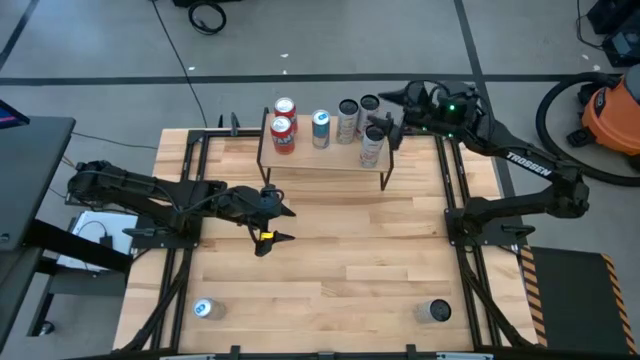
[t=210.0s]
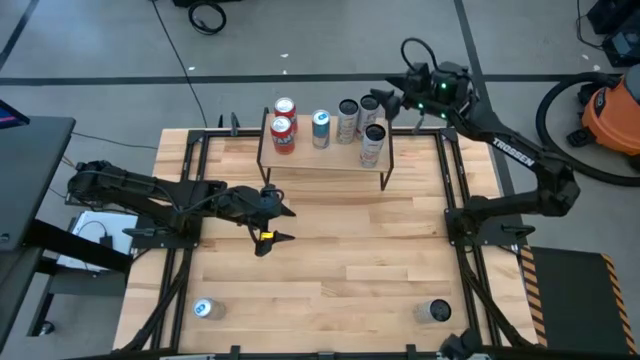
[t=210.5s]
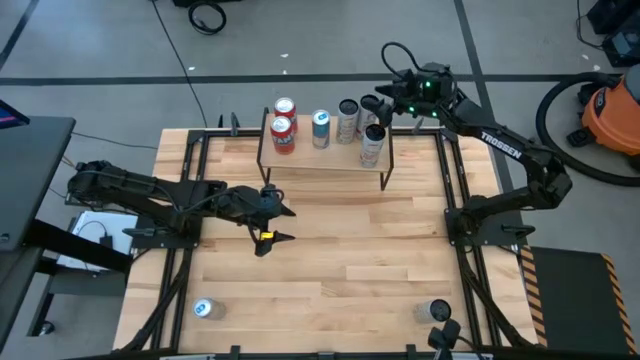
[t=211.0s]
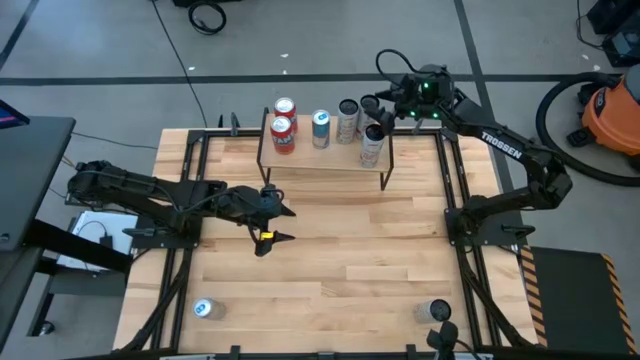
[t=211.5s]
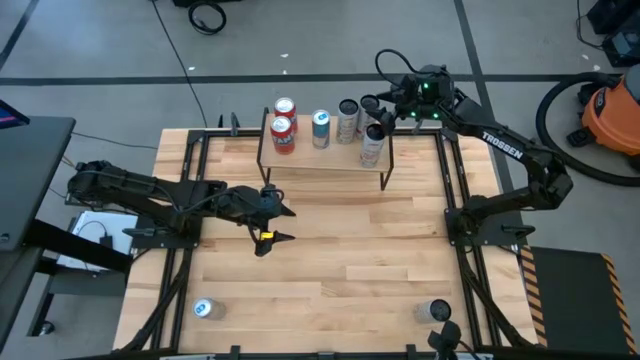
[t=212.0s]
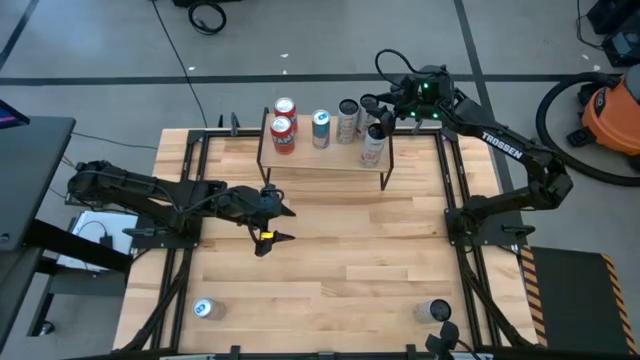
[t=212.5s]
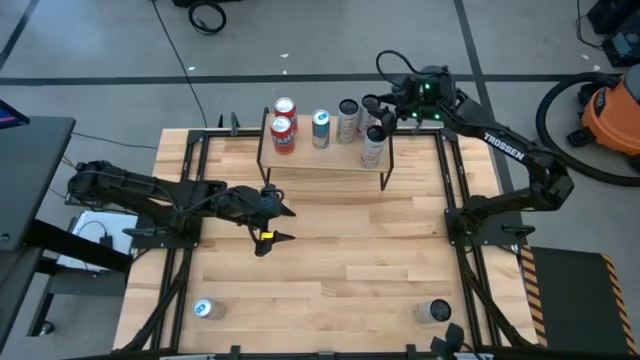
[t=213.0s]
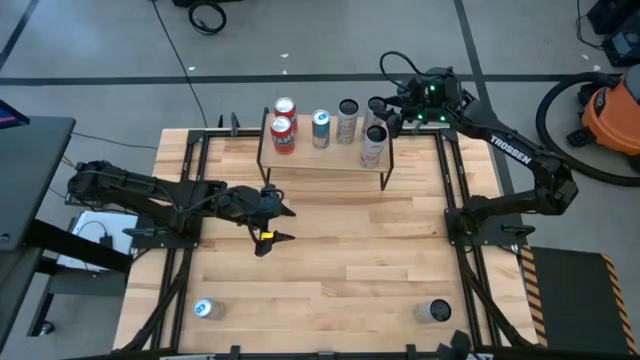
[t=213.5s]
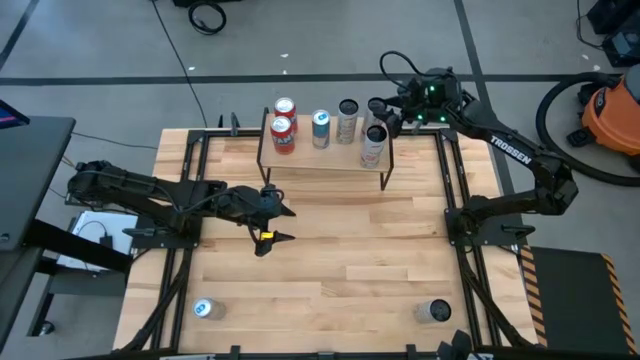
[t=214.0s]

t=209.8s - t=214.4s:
Task: Place canned beverage on shelf
Adjust the white pink soda can

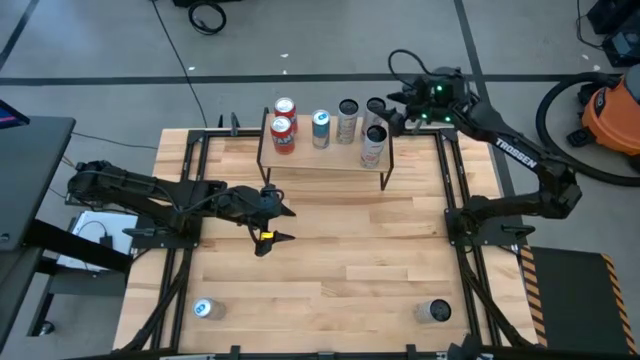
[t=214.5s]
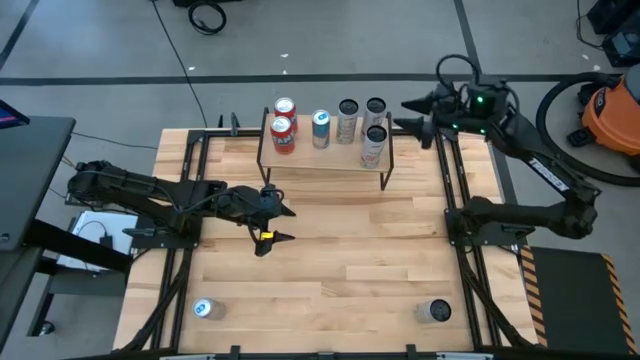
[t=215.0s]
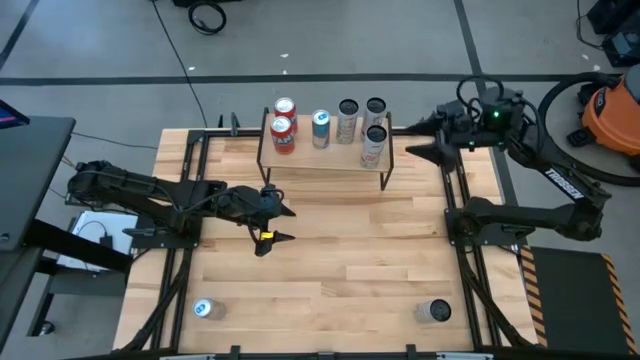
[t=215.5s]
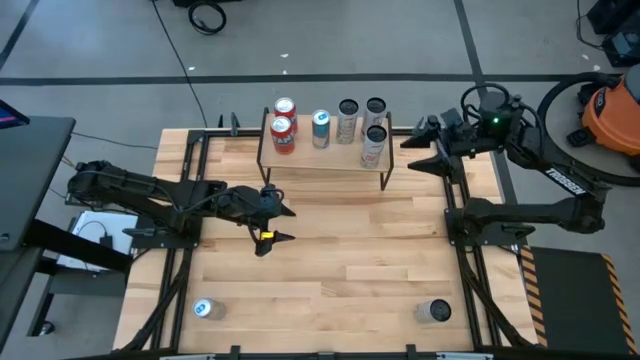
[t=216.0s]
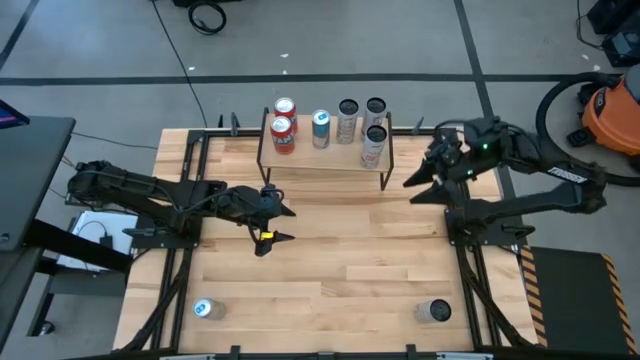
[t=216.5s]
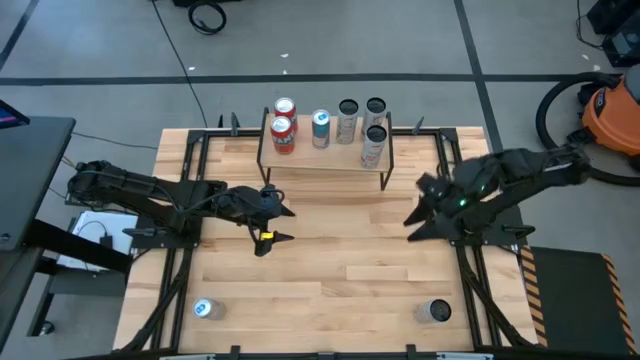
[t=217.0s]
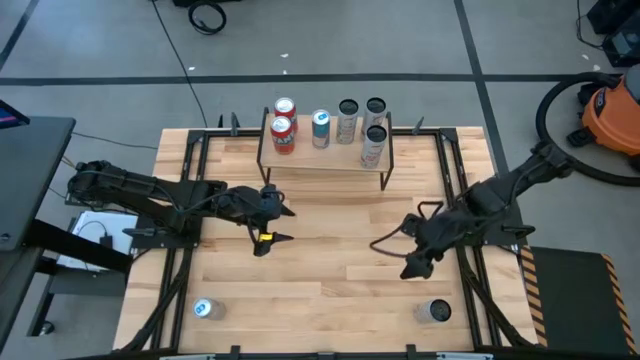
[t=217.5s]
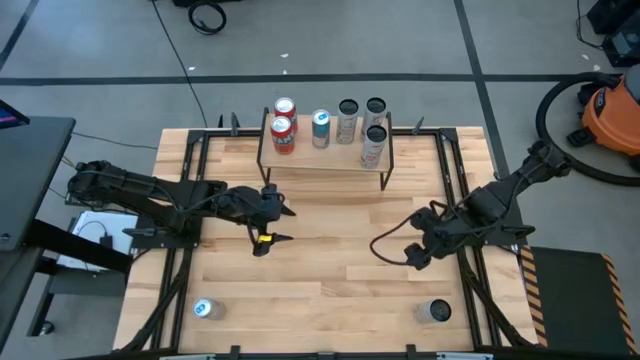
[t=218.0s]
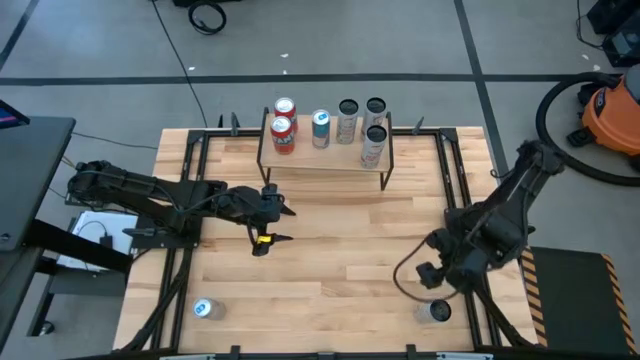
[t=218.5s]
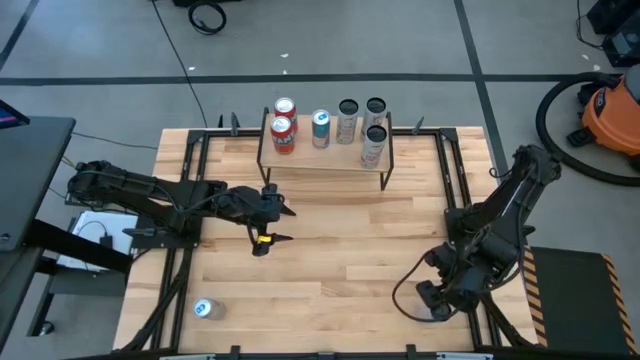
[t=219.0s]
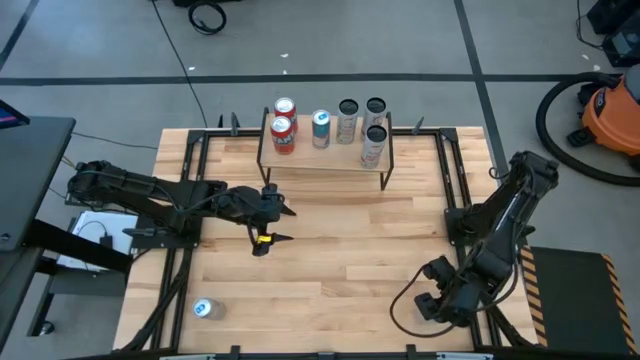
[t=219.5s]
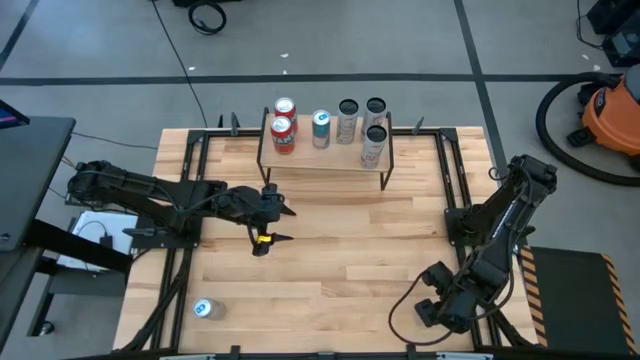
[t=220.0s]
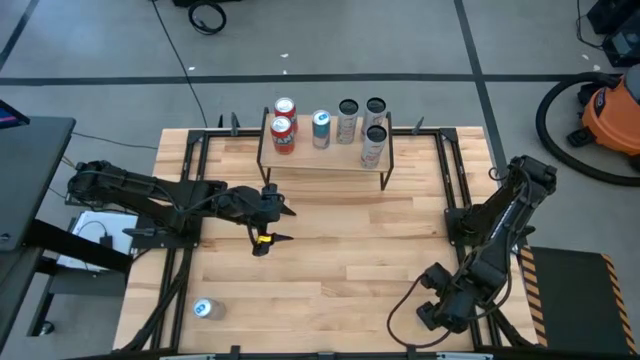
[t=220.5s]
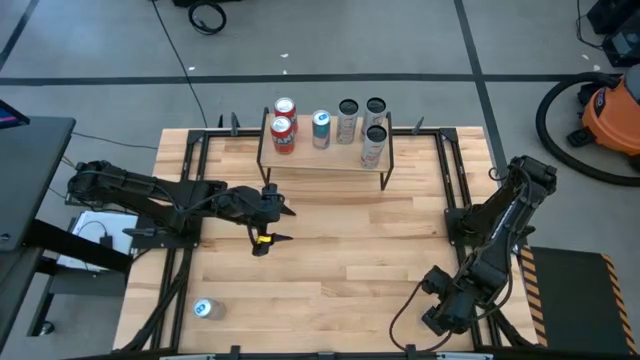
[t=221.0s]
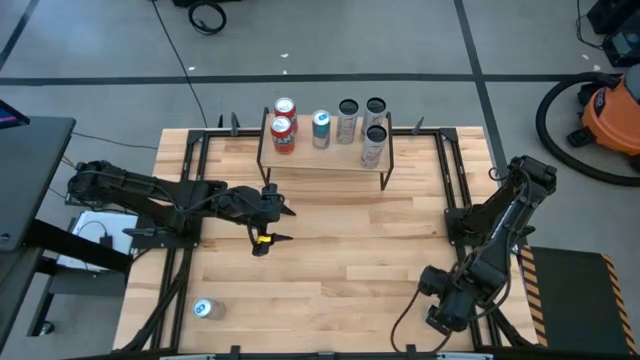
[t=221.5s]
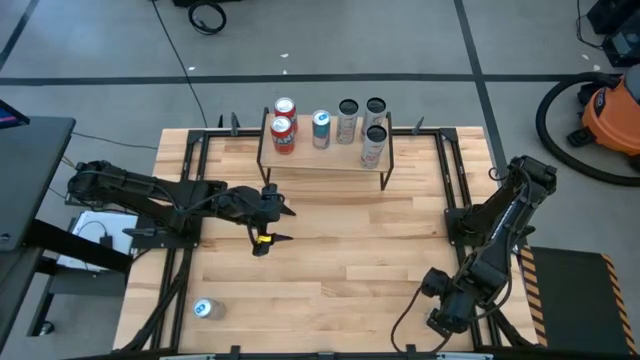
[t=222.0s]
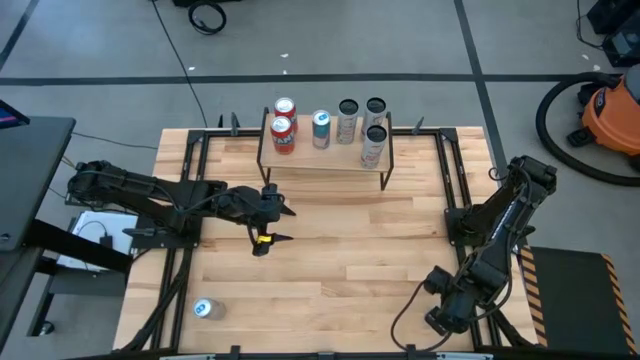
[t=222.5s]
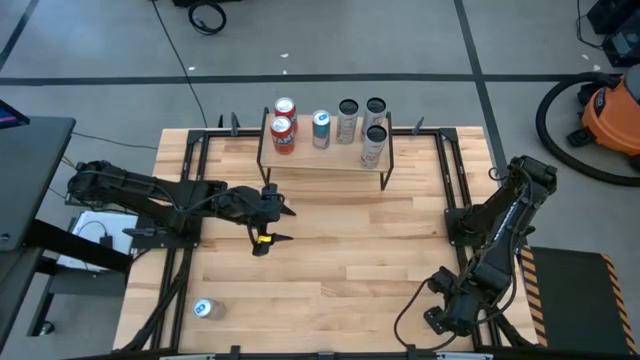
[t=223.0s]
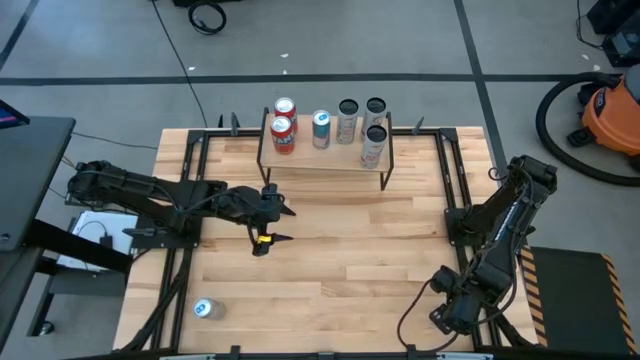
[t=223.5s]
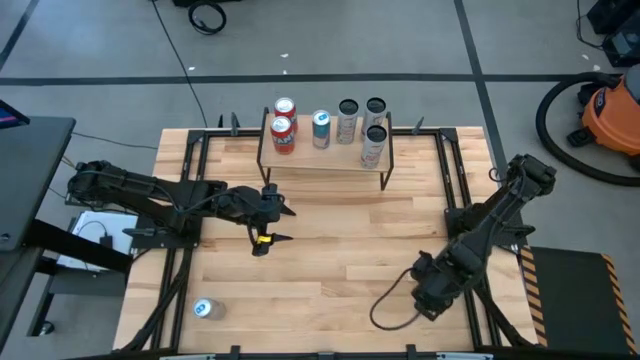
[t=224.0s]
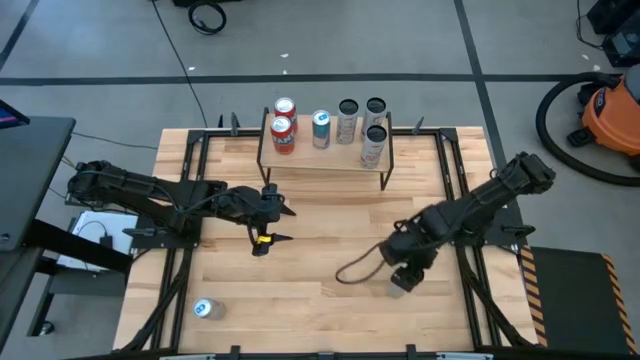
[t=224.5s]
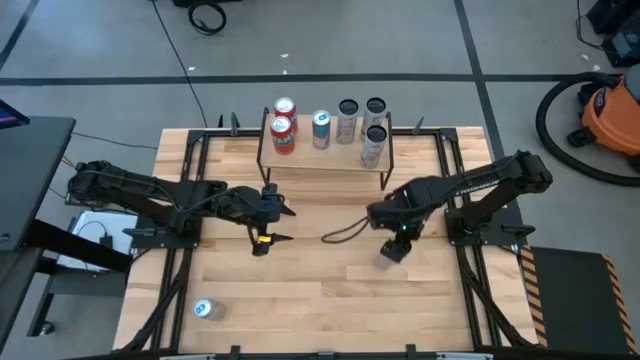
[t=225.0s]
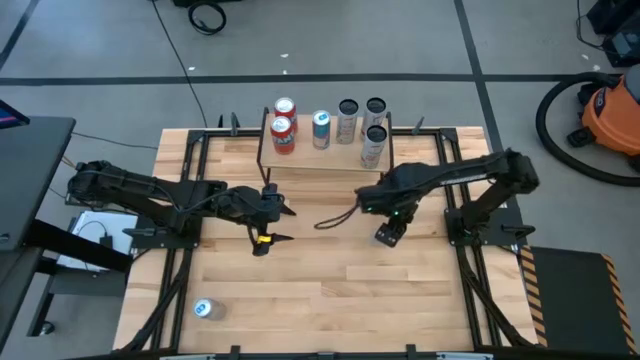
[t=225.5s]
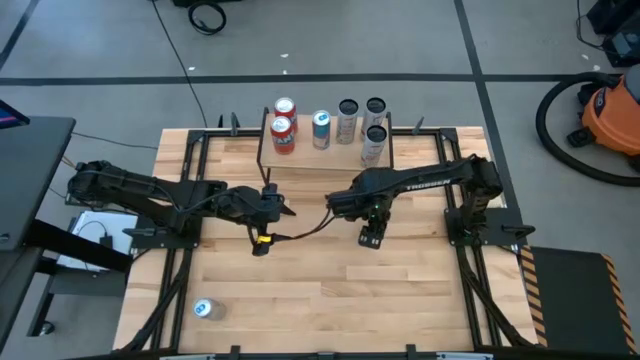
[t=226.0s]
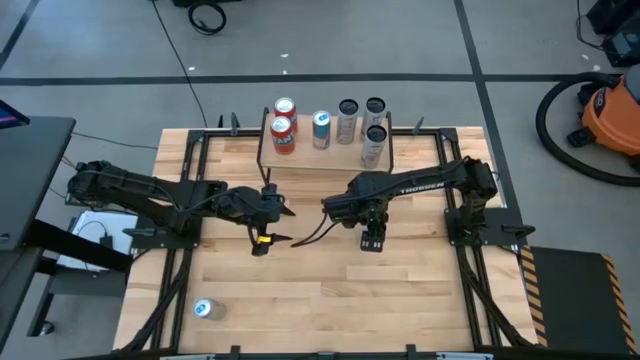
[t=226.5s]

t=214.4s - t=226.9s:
Put the white yellow soda can on the shelf aligned with the other white yellow soda can
